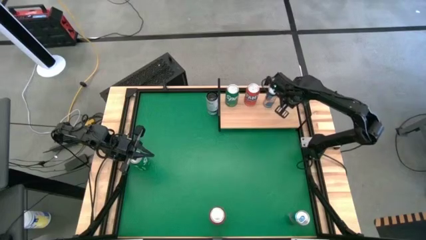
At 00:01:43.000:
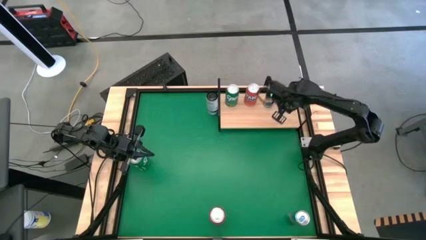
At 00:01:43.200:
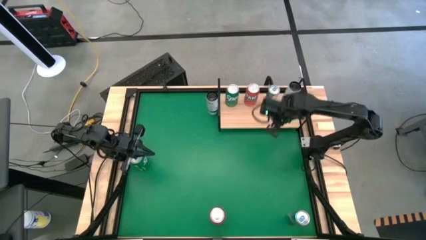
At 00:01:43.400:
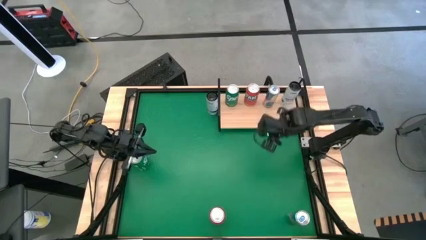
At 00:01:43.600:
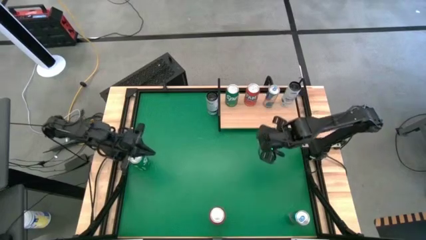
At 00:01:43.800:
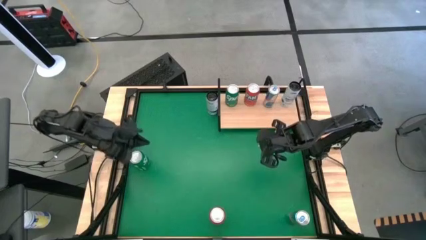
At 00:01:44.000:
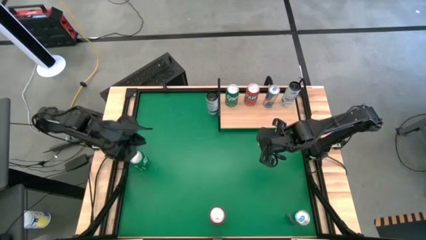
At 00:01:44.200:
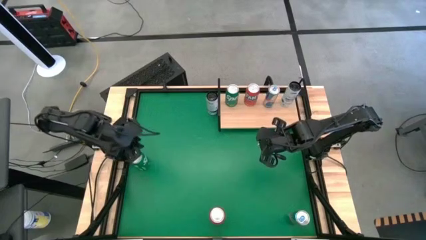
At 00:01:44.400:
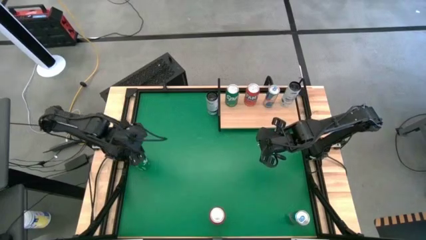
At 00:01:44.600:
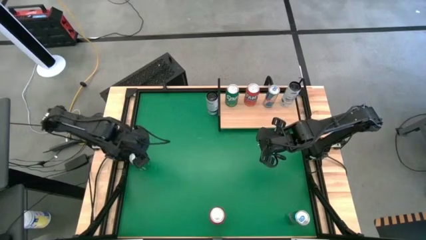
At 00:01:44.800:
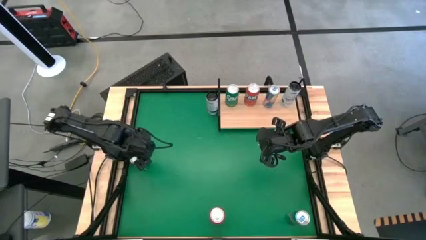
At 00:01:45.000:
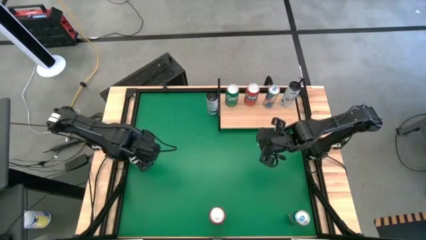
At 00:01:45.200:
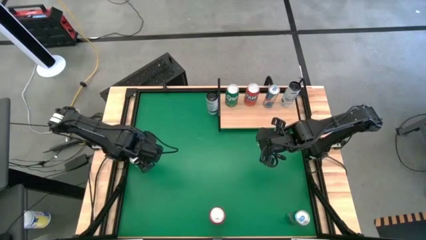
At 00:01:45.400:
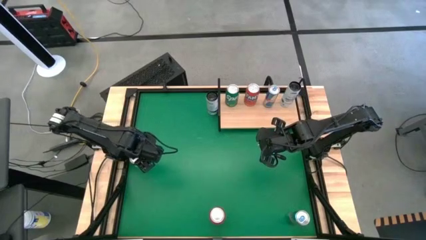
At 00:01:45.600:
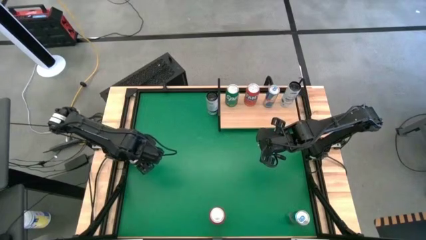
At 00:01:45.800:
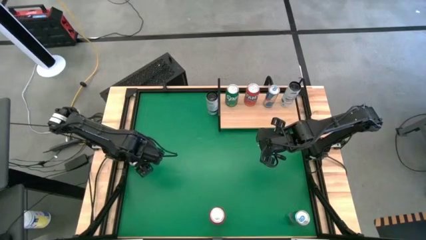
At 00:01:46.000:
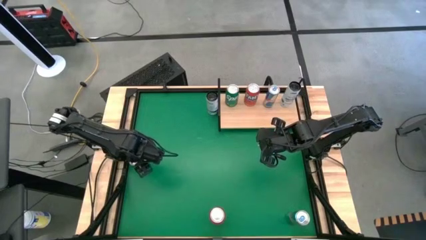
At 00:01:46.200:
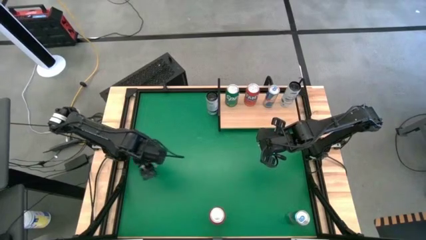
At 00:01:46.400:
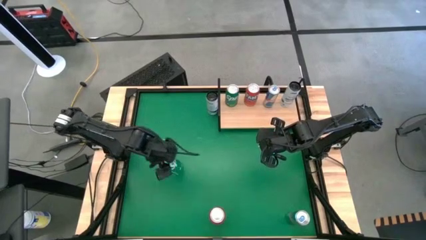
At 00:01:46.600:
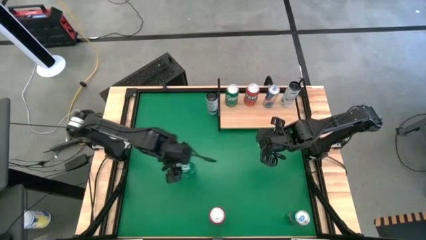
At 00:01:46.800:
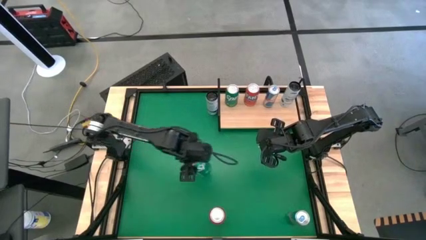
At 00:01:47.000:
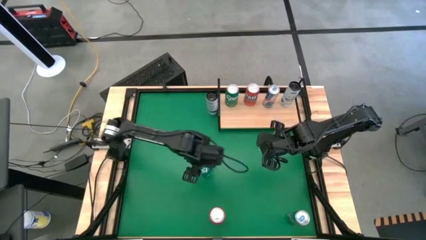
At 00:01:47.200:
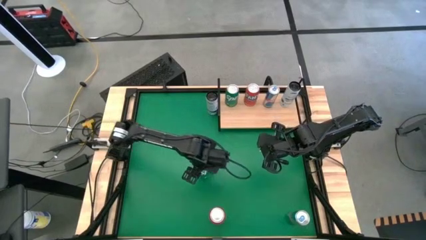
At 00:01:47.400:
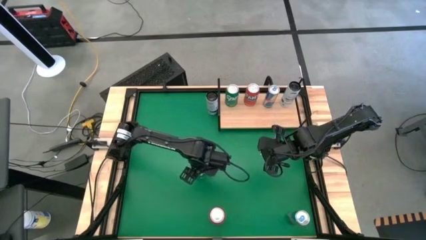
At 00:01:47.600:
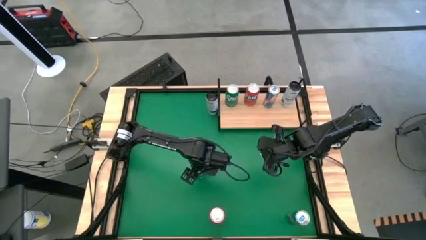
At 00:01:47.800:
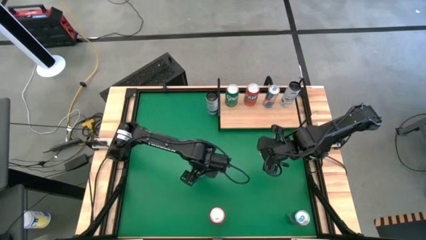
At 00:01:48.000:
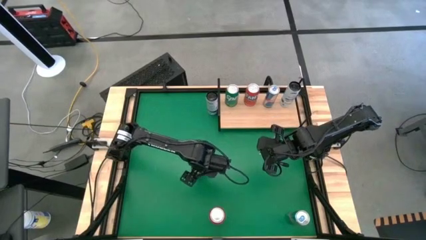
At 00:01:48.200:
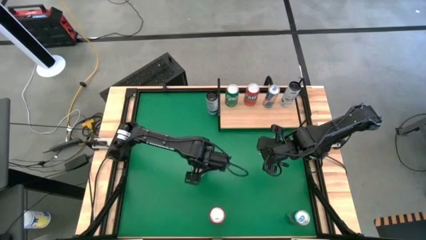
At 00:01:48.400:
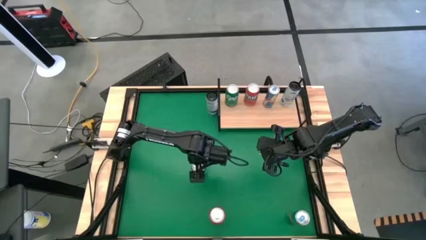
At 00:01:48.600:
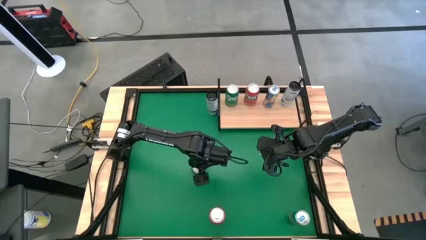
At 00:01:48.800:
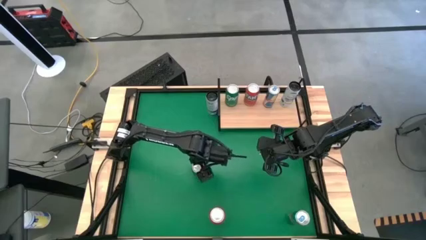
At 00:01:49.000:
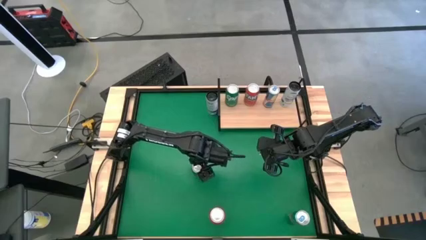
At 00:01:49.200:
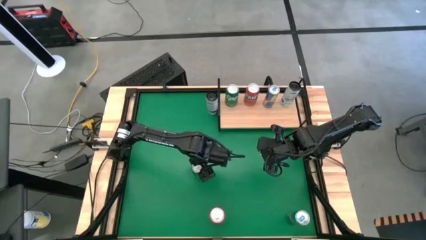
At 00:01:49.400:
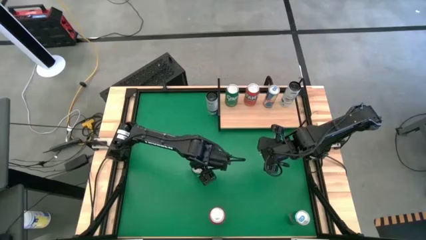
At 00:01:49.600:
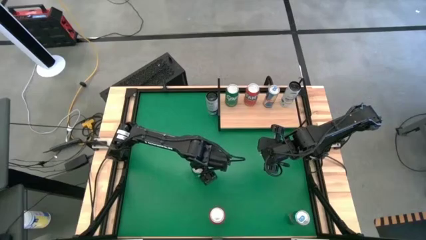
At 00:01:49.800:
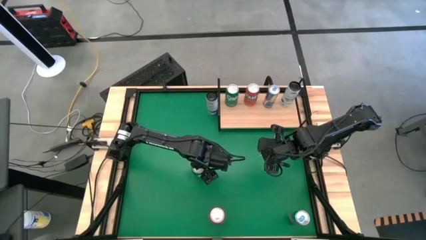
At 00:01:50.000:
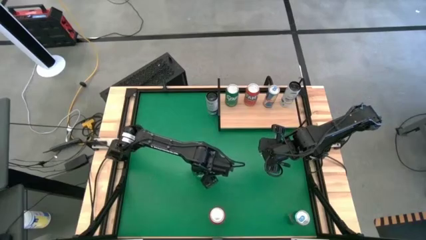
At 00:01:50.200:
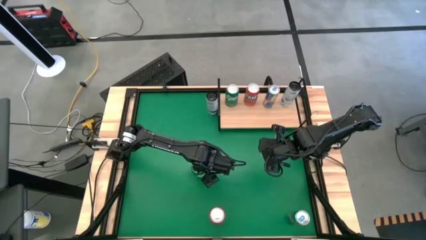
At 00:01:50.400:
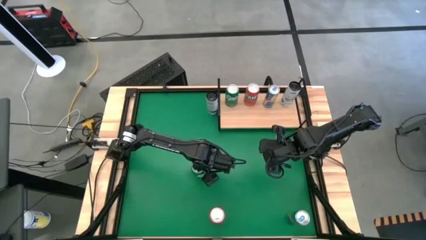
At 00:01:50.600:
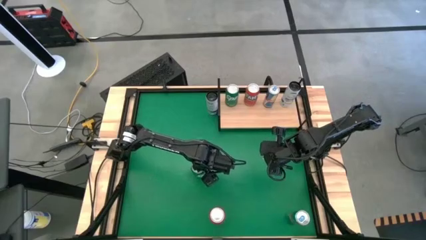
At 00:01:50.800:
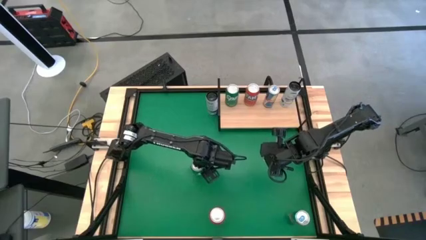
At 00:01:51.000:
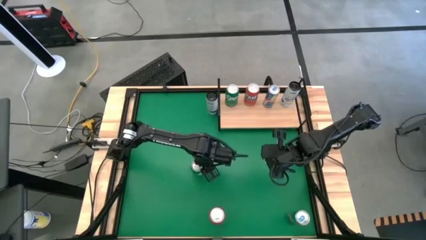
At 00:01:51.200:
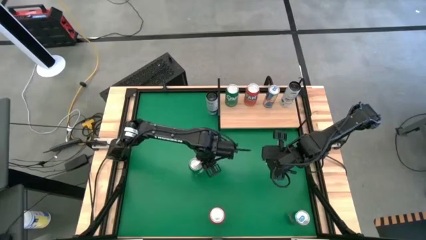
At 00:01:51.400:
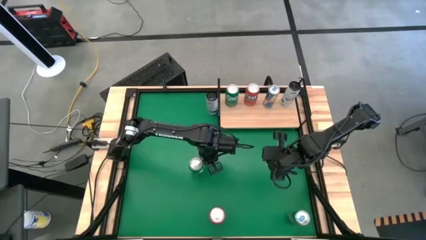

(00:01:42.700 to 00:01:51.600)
Task: Place canned beverage on shelf
Put the green soda can on the shelf aligned with the other green soda can

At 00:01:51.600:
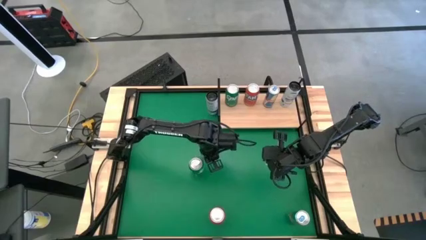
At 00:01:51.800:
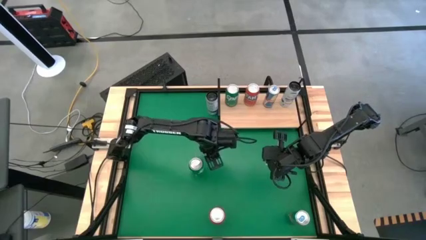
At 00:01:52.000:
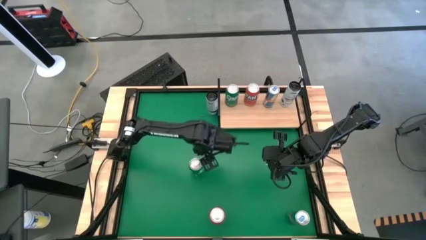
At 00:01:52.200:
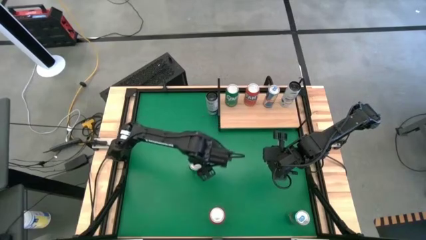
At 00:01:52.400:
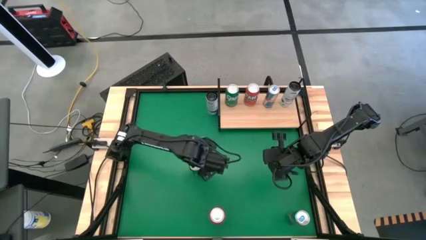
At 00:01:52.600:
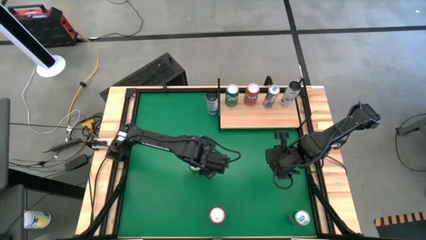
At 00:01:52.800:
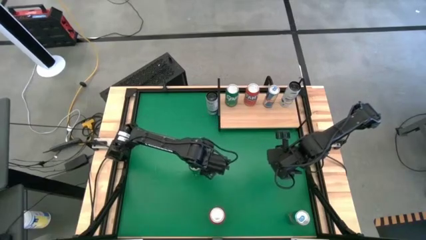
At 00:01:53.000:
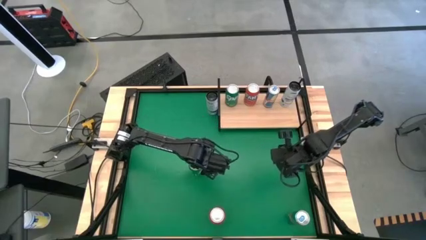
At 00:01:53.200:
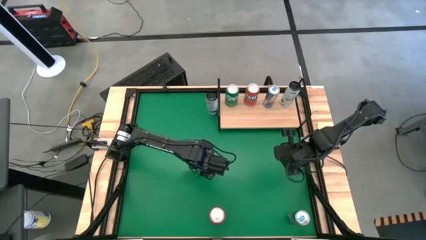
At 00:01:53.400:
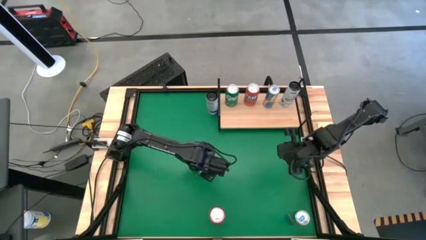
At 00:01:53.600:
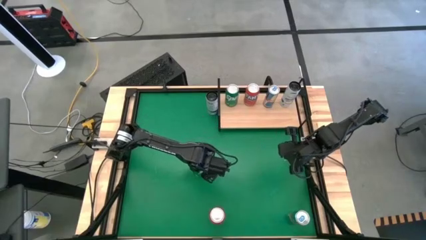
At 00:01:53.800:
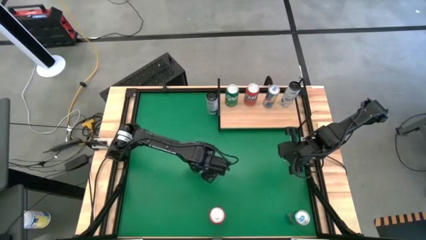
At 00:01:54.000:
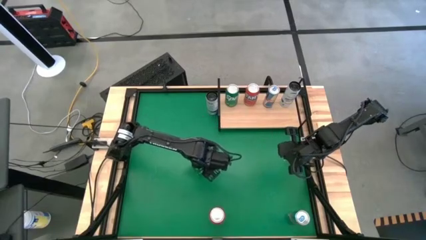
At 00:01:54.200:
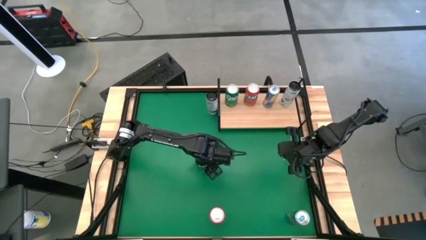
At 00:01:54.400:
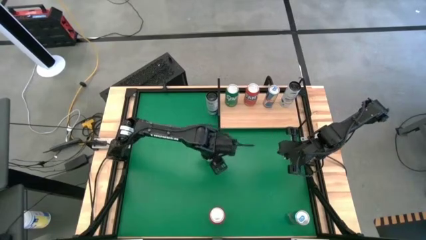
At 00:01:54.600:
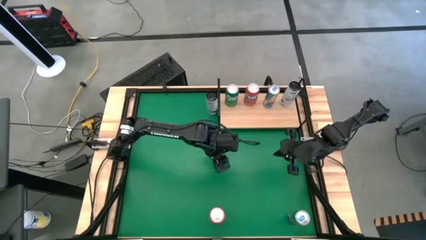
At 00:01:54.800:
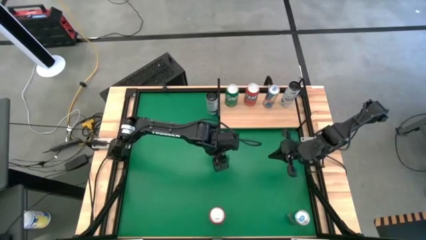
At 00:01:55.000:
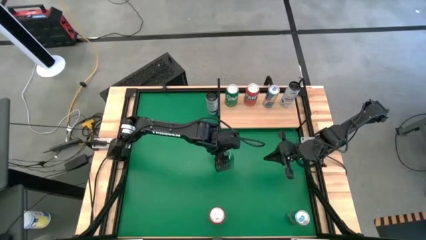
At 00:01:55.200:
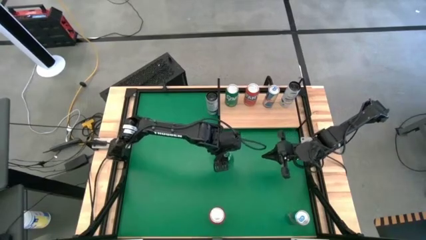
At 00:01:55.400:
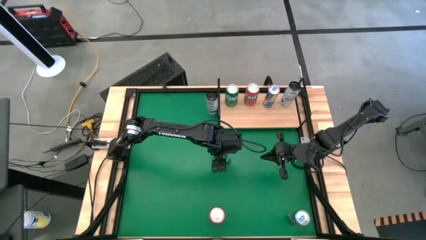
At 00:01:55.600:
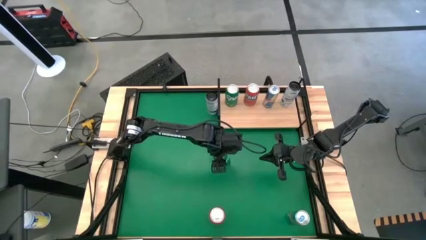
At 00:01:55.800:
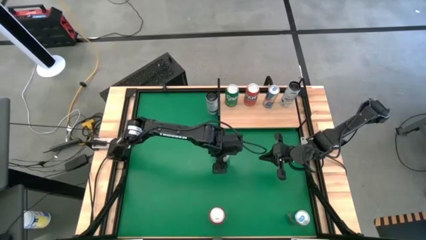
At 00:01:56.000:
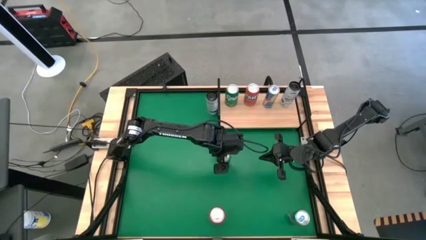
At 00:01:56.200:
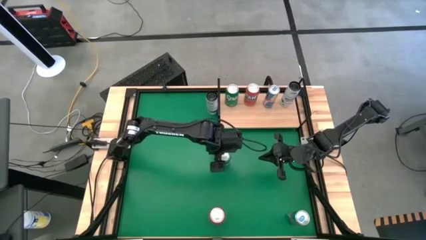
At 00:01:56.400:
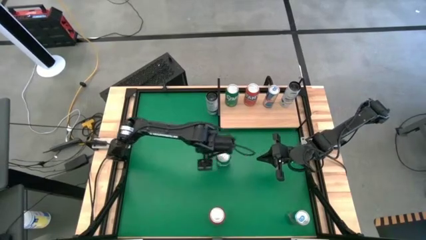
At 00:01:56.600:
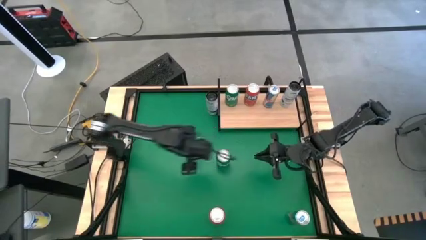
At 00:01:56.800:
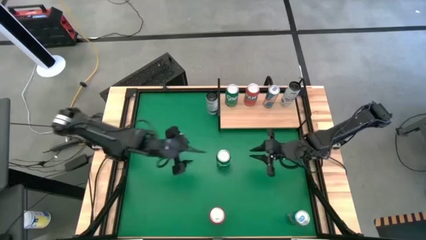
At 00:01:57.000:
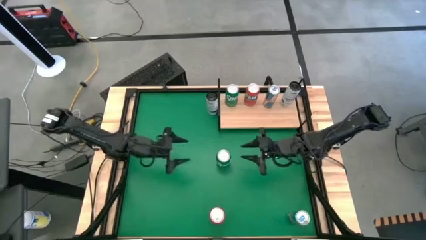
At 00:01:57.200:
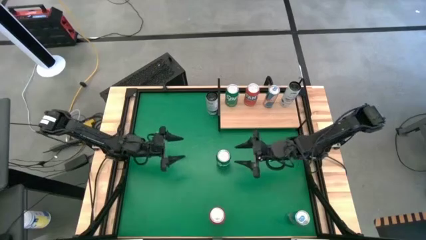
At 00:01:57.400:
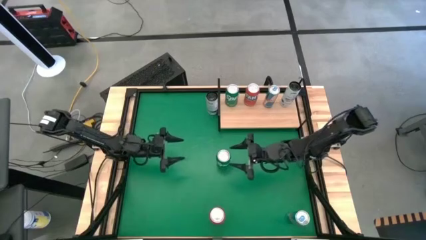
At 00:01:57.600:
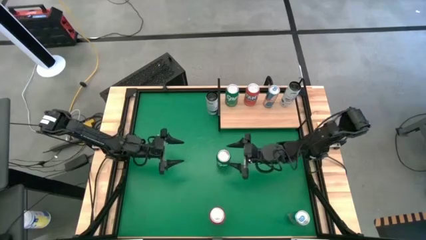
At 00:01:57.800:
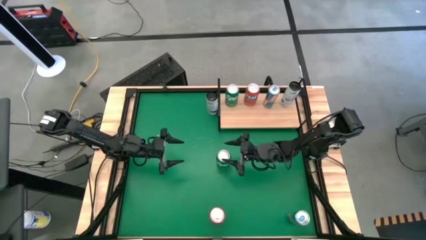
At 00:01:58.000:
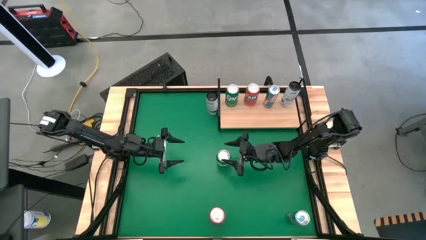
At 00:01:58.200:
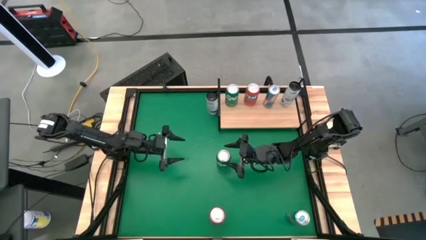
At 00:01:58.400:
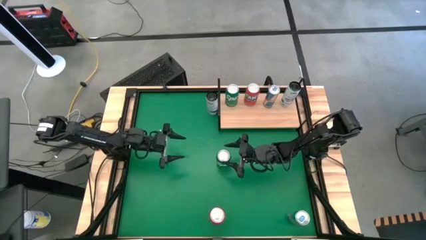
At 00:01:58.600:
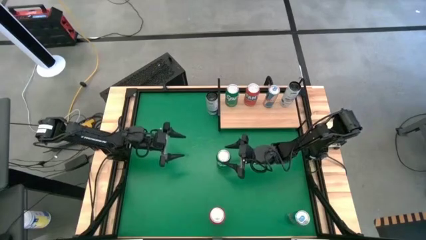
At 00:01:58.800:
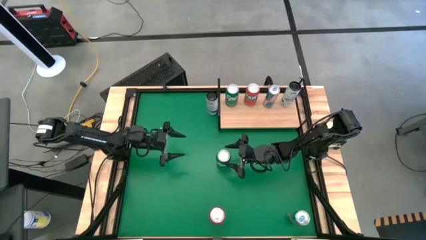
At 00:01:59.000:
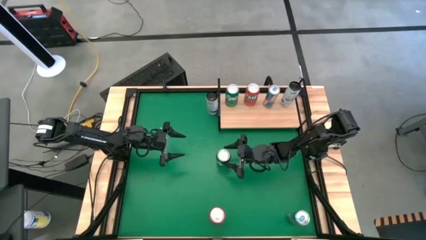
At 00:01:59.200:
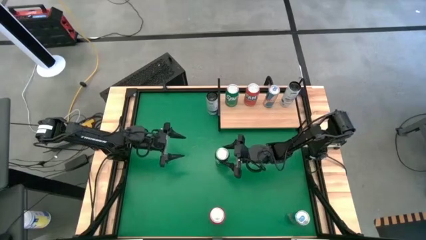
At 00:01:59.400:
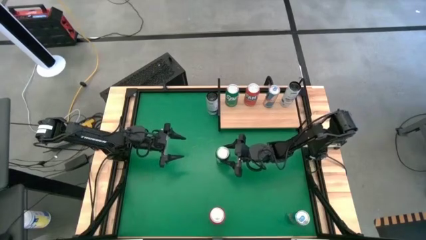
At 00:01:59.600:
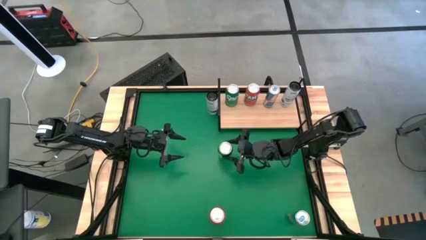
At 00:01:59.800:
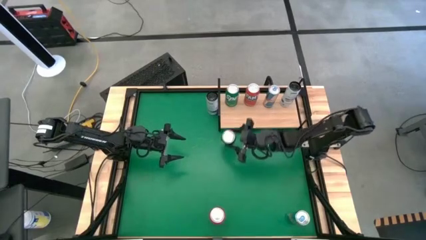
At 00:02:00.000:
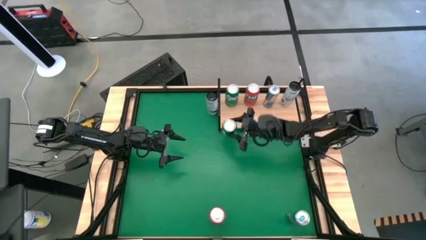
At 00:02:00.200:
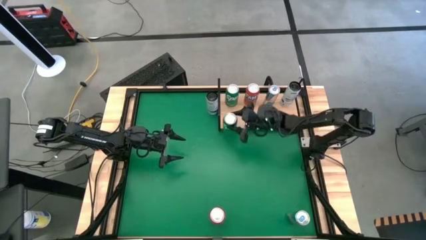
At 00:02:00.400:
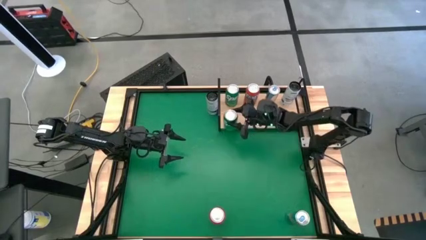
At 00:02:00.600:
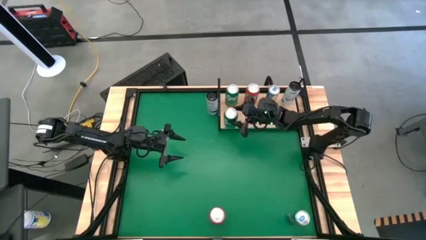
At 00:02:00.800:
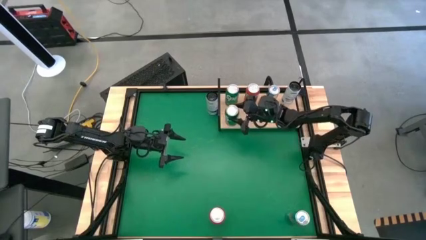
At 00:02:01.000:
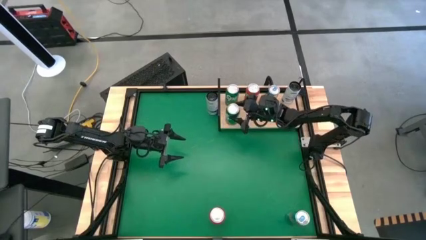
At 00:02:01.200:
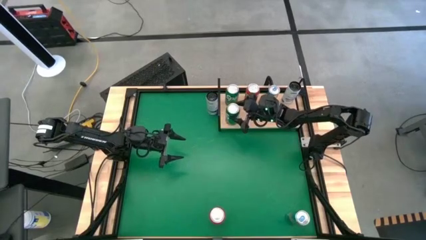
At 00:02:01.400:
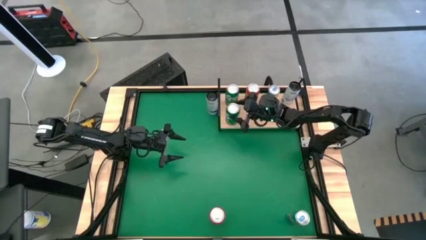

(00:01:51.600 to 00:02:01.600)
Put the green soda can on the shelf aligned with the other green soda can
